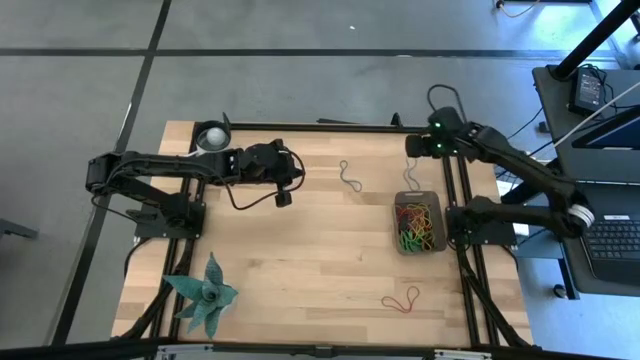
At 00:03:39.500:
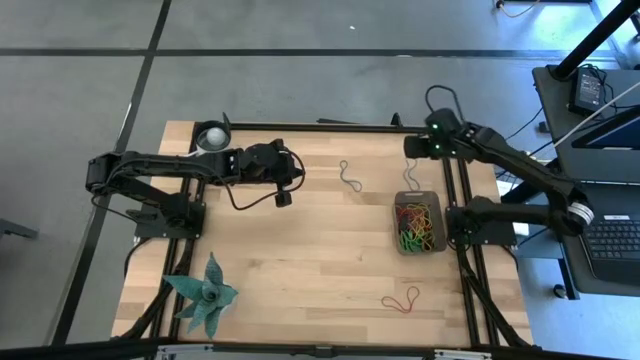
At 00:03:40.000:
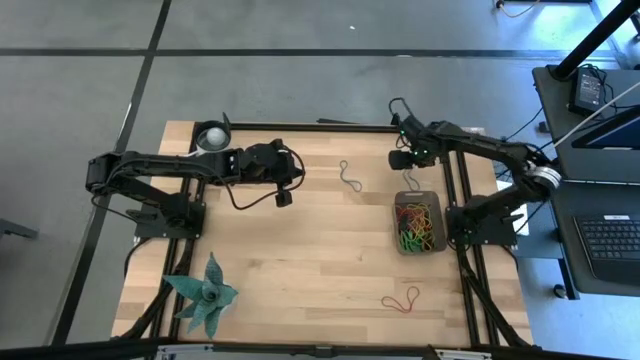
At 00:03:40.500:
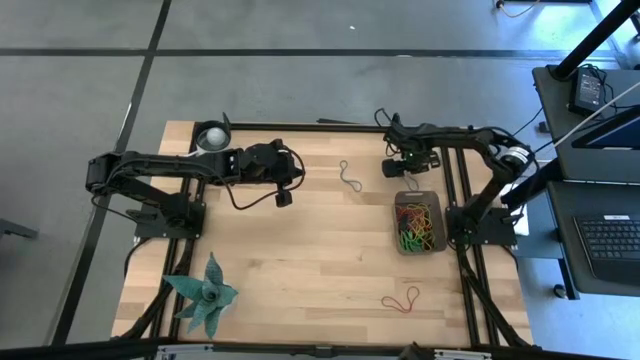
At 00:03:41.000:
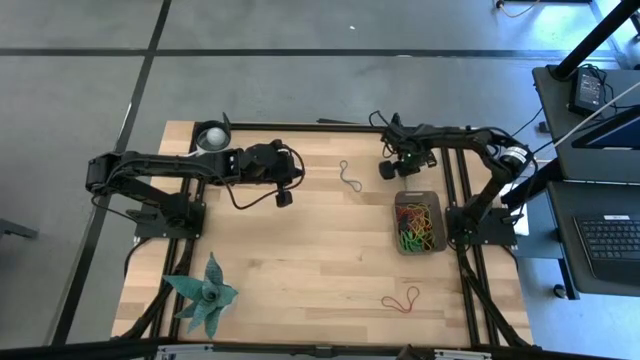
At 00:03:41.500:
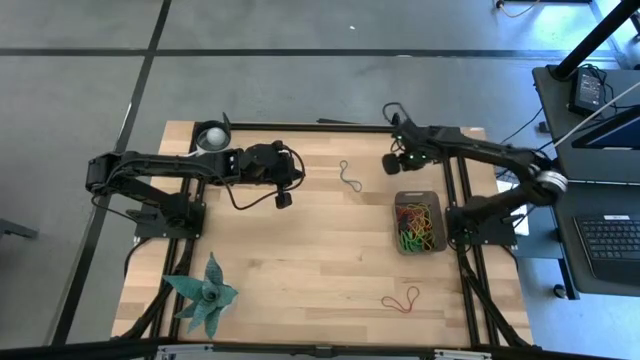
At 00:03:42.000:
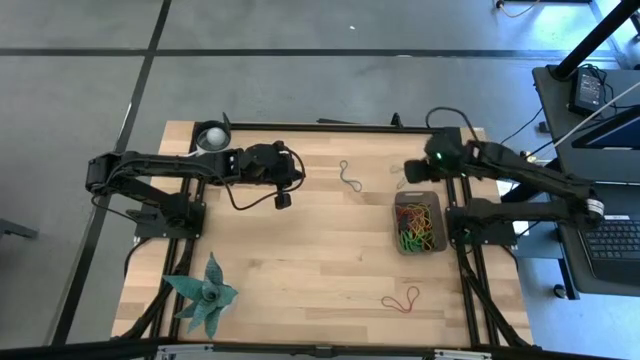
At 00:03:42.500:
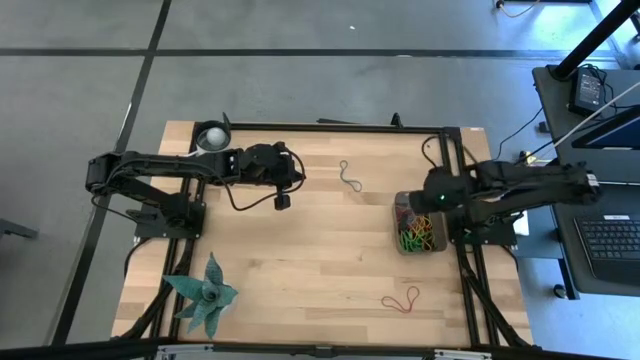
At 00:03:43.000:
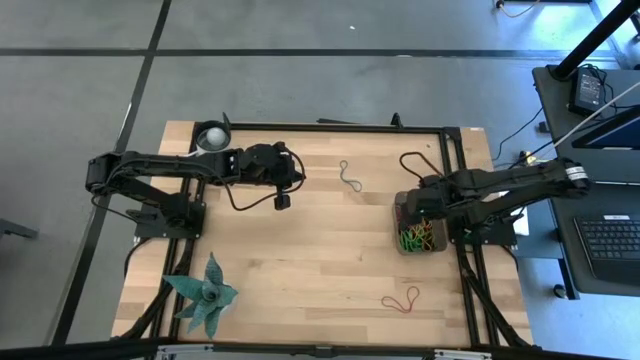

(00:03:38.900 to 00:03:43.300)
Task: Pick and place rubber bands into bin
Put the blue rubber band into the black bin

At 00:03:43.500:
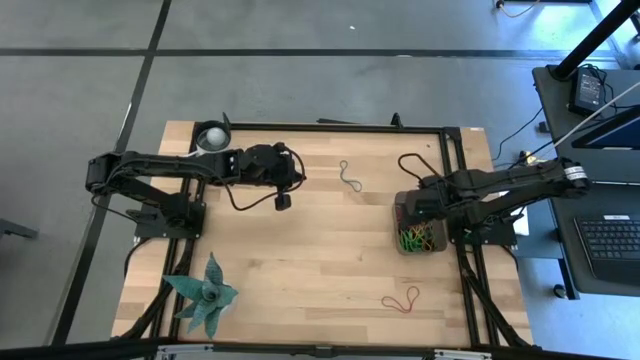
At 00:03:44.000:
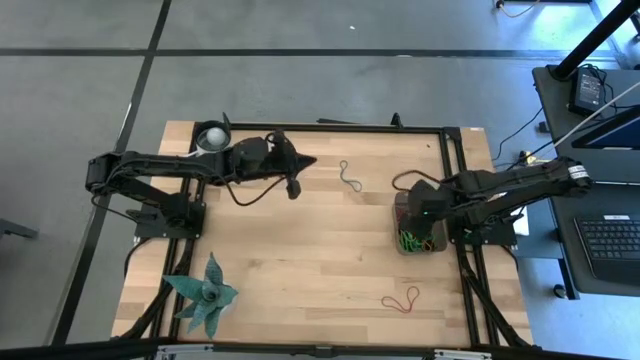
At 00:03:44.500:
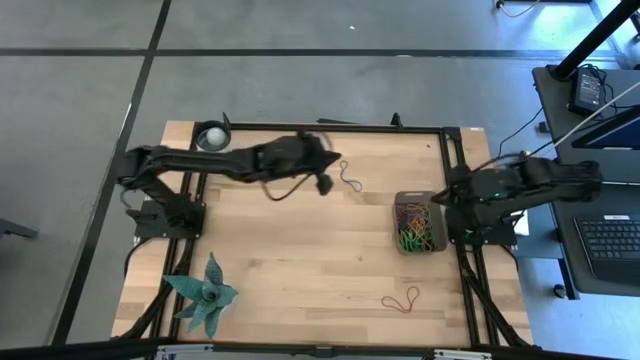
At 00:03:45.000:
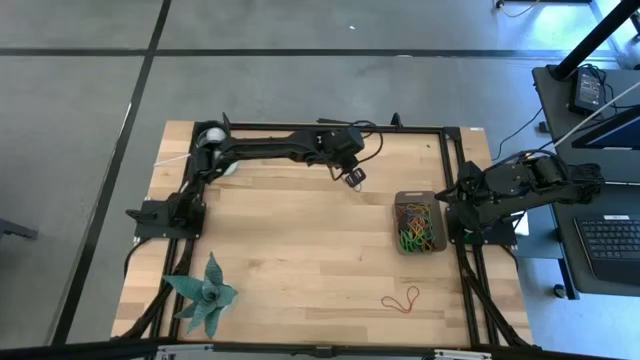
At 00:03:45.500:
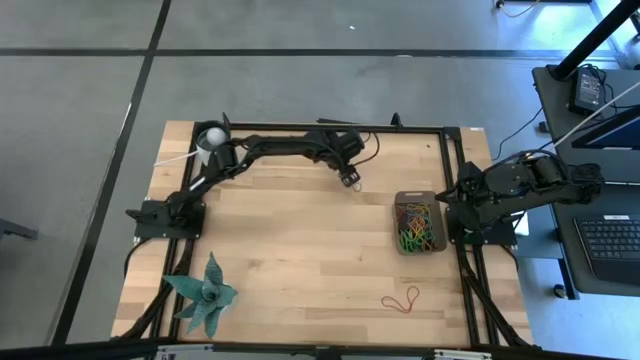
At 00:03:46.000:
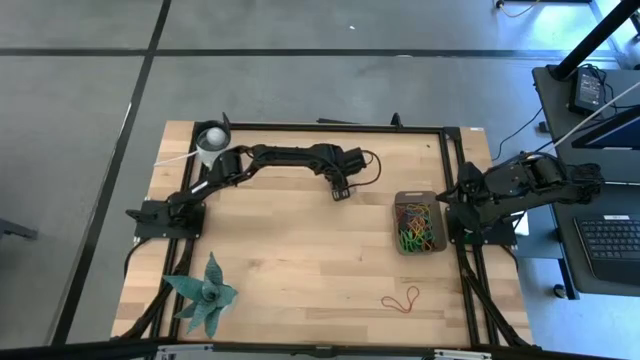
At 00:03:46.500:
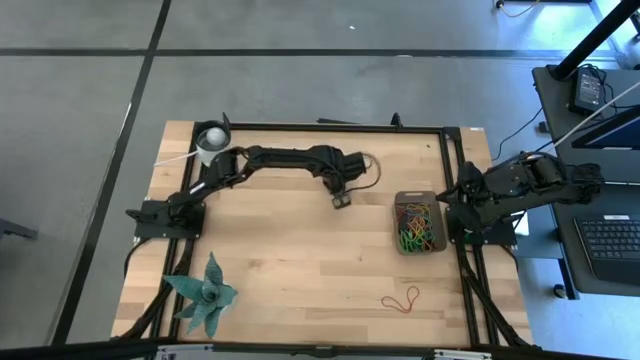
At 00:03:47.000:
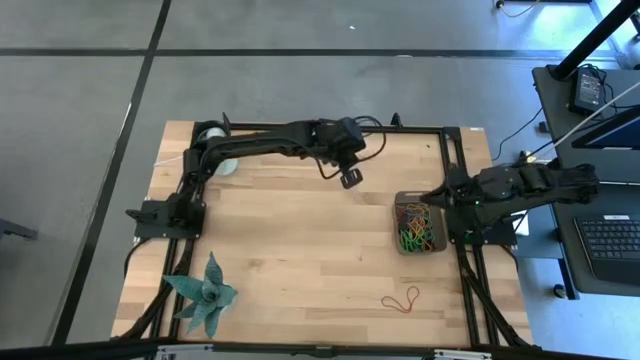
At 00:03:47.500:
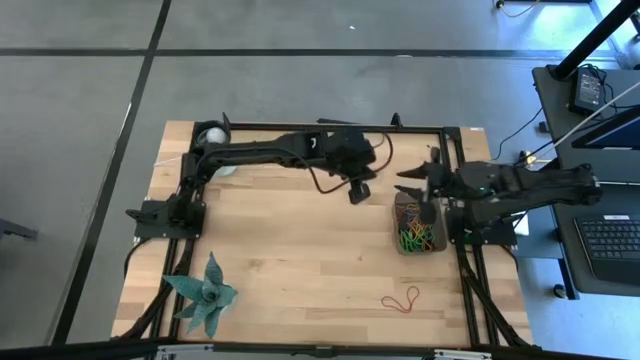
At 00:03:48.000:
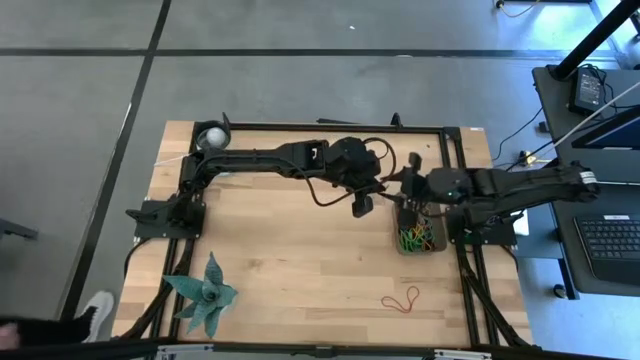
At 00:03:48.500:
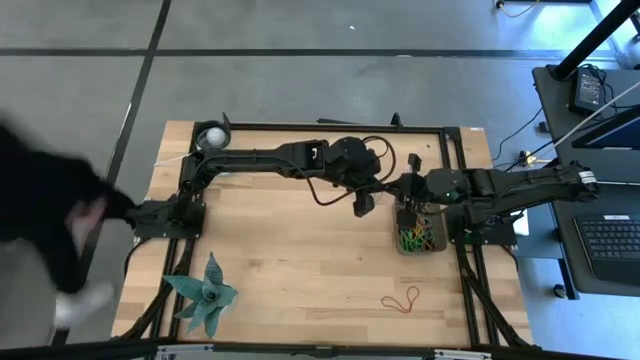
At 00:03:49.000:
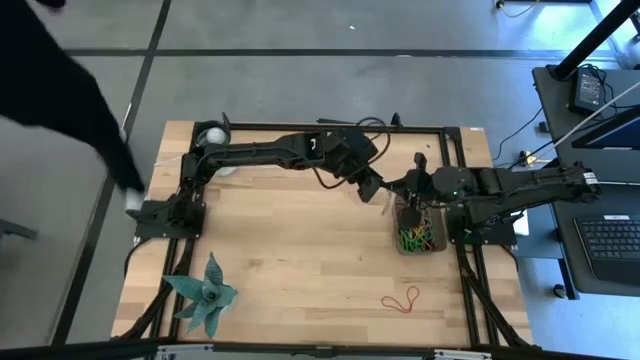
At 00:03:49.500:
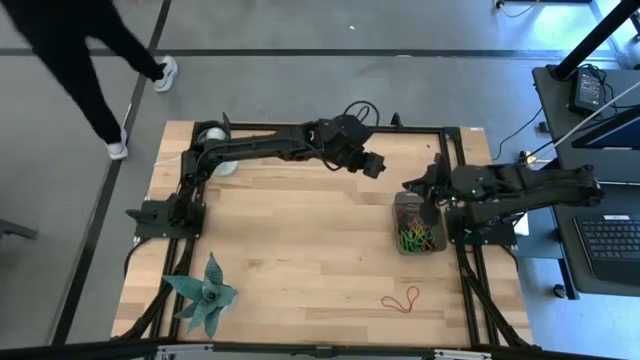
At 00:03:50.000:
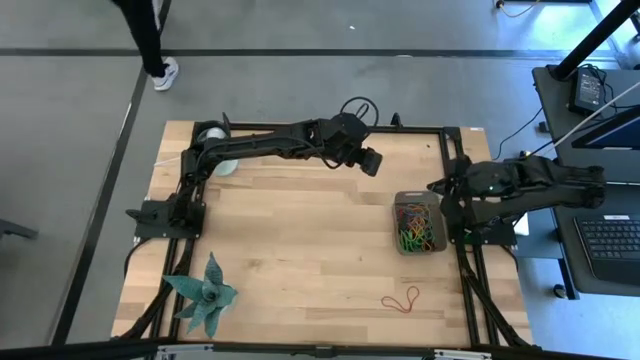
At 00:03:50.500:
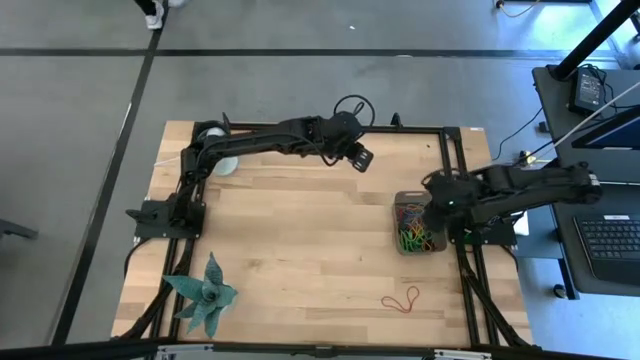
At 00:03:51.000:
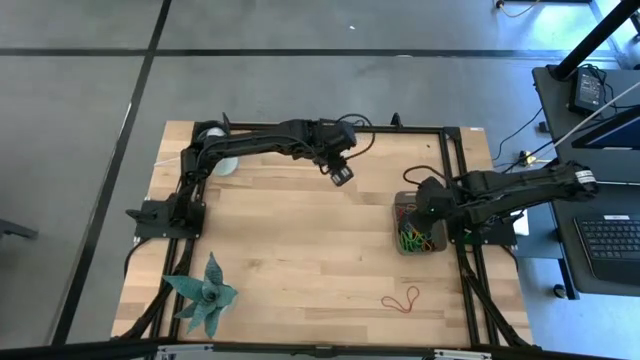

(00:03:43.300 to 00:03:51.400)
Put the blue rubber band into the black bin

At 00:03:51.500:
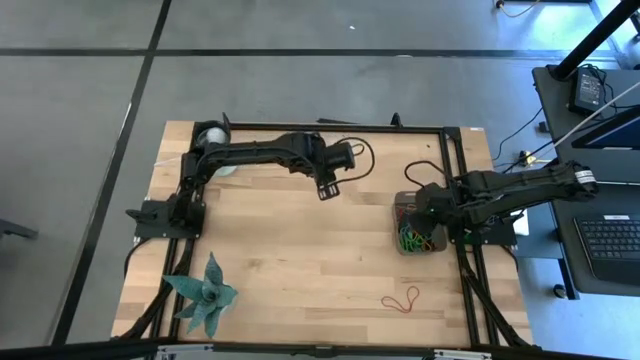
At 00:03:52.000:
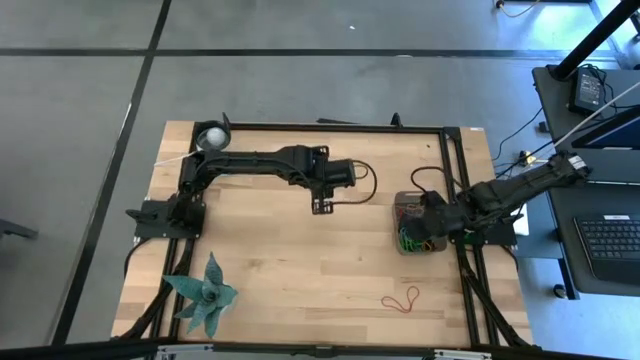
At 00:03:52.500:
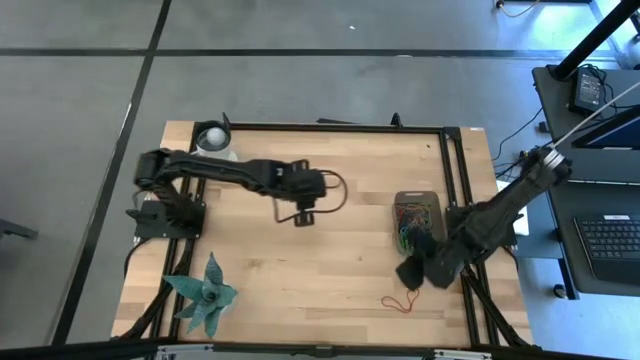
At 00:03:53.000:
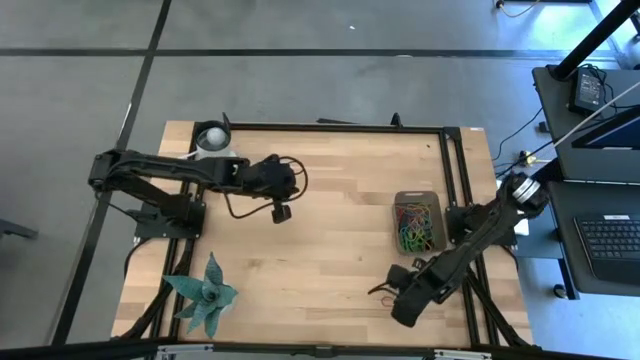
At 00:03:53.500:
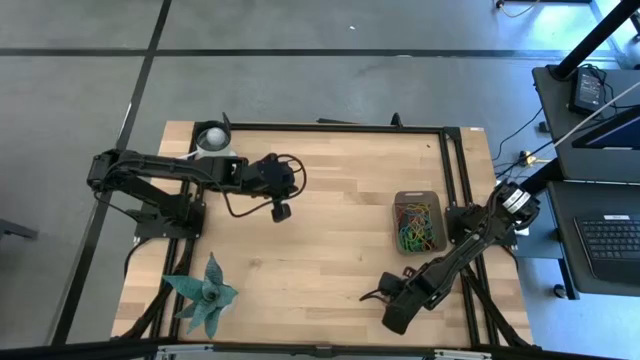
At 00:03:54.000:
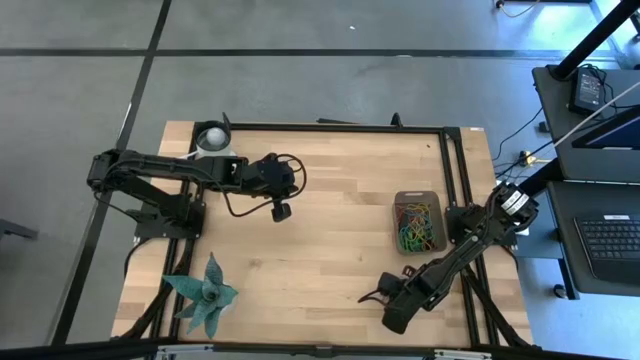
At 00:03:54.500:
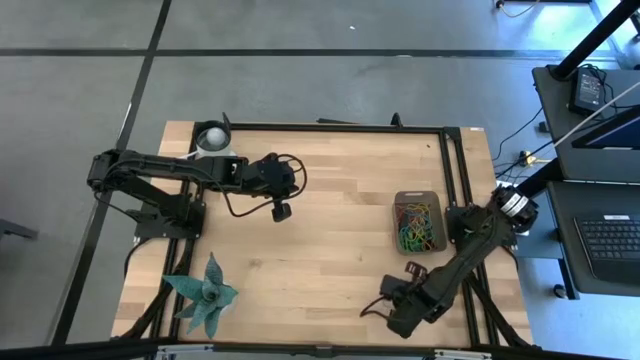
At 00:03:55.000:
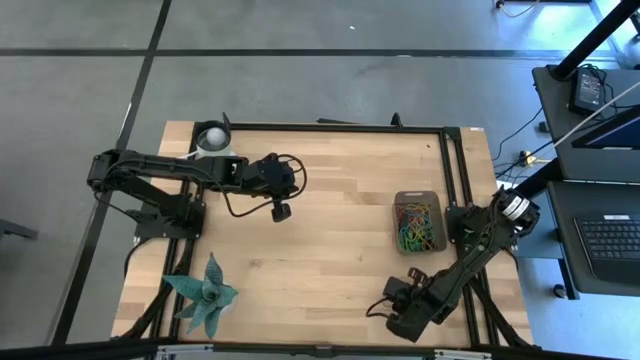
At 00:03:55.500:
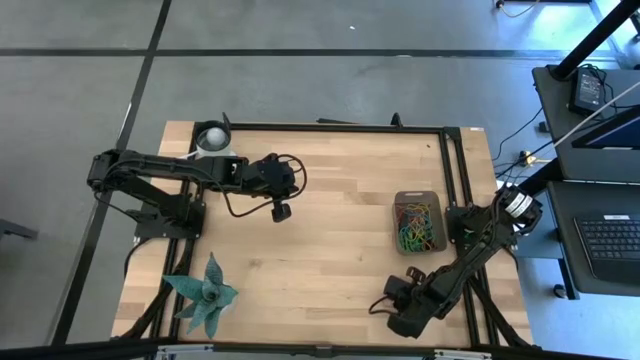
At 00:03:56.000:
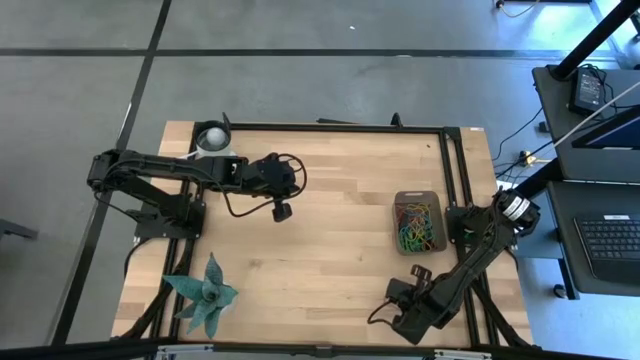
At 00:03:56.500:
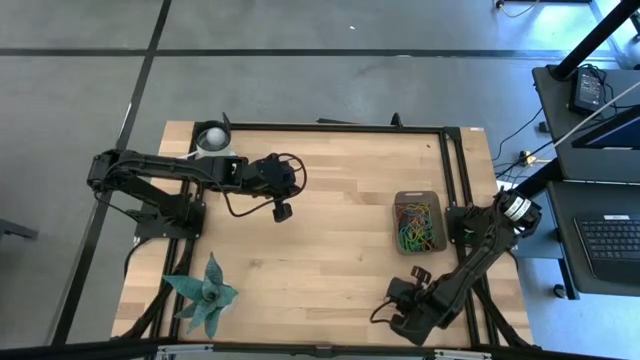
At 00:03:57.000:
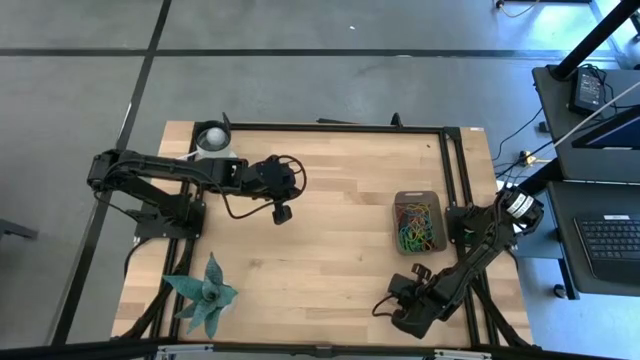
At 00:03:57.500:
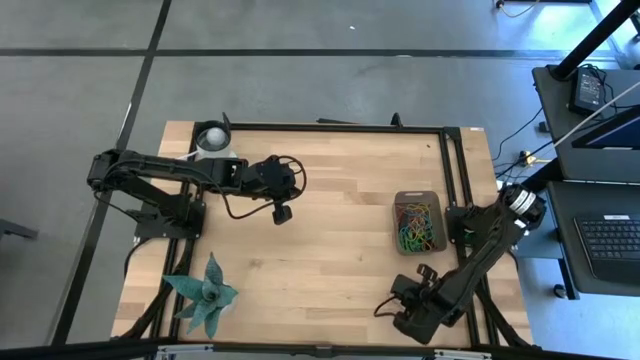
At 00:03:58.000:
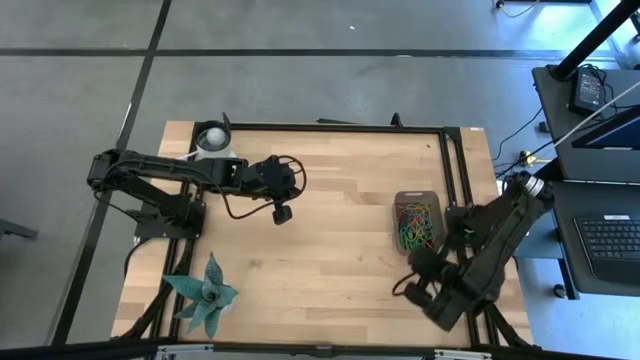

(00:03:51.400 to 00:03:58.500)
Put the red rubber band into the black bin

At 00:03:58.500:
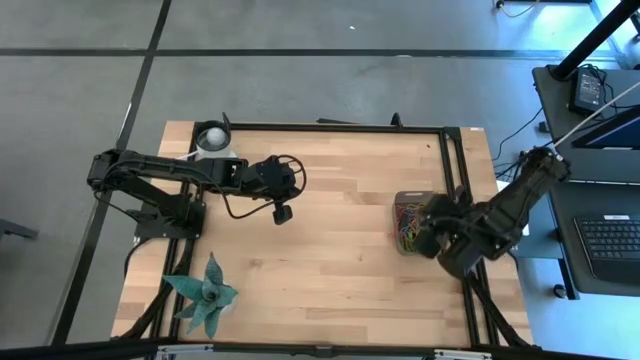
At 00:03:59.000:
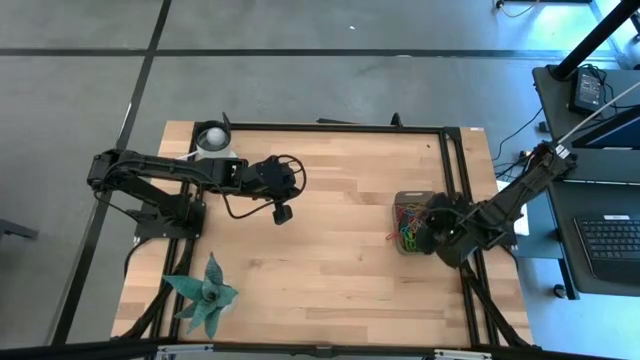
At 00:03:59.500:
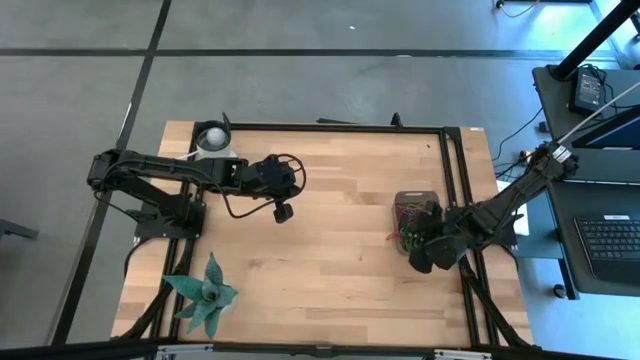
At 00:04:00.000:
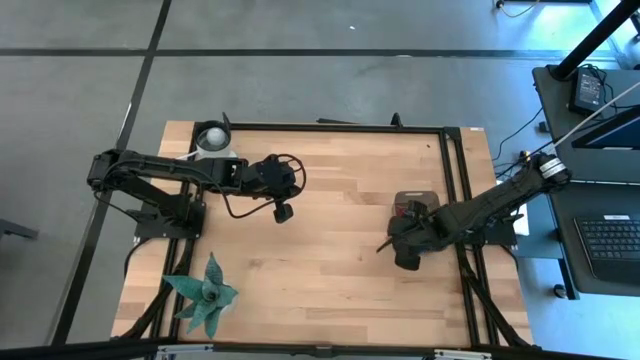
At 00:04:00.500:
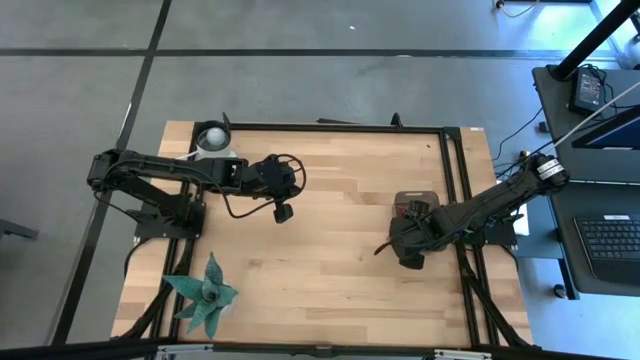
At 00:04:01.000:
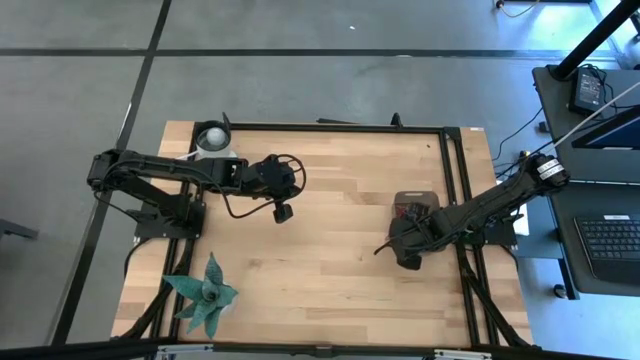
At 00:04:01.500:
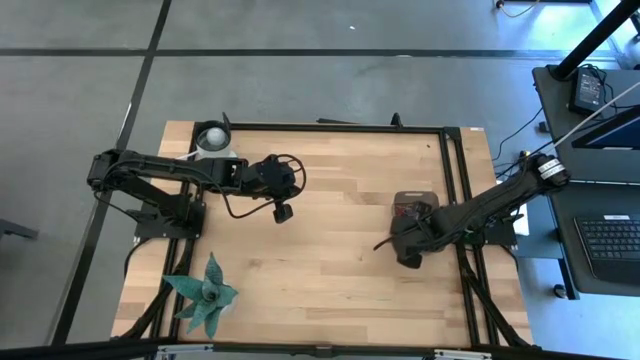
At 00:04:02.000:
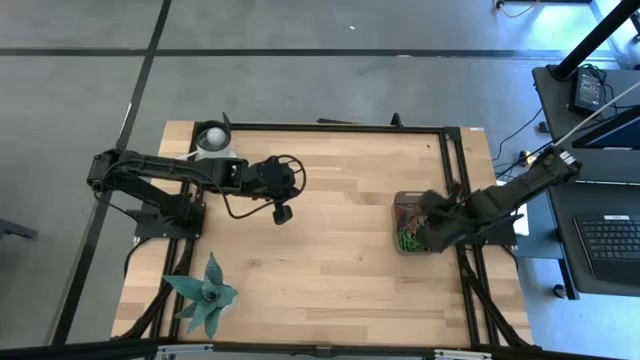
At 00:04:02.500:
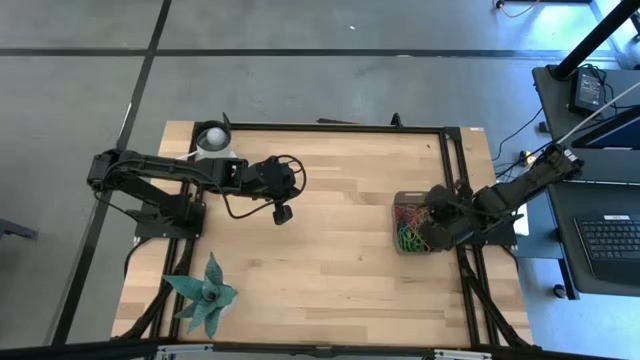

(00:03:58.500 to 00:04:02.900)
Put the red rubber band into the black bin
